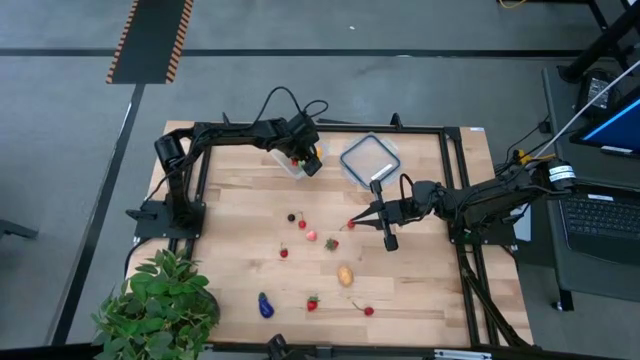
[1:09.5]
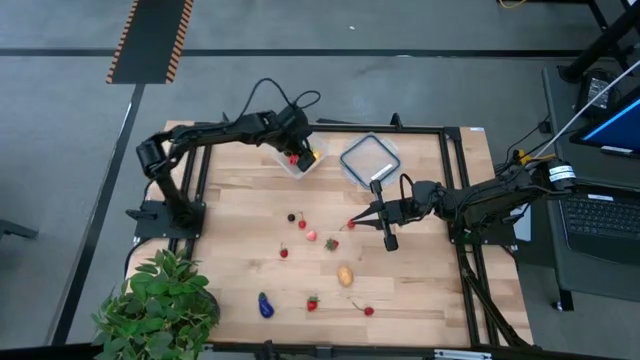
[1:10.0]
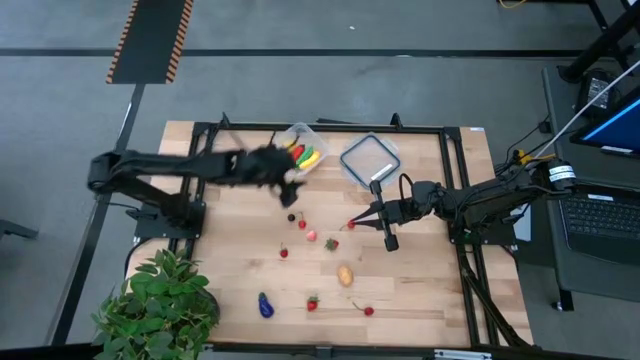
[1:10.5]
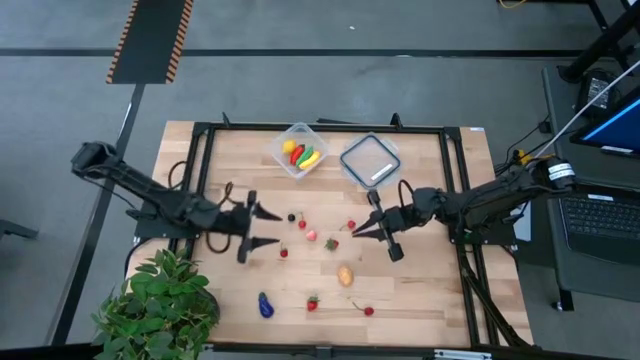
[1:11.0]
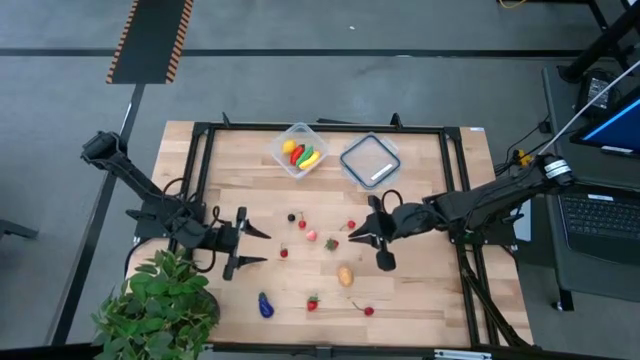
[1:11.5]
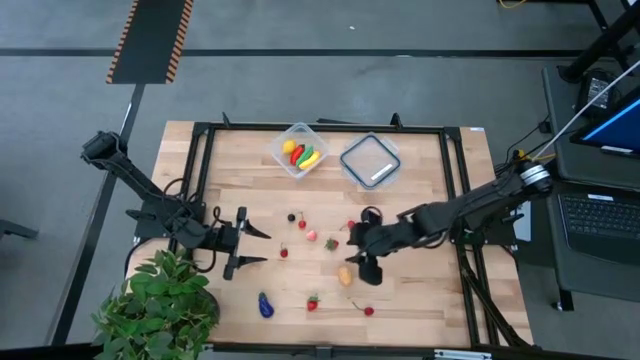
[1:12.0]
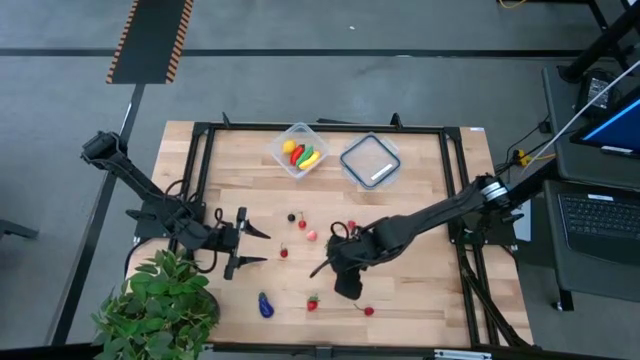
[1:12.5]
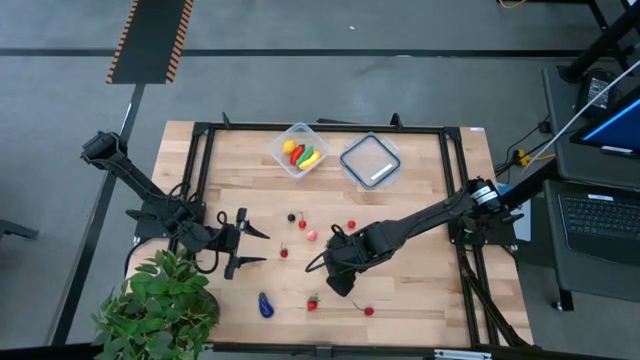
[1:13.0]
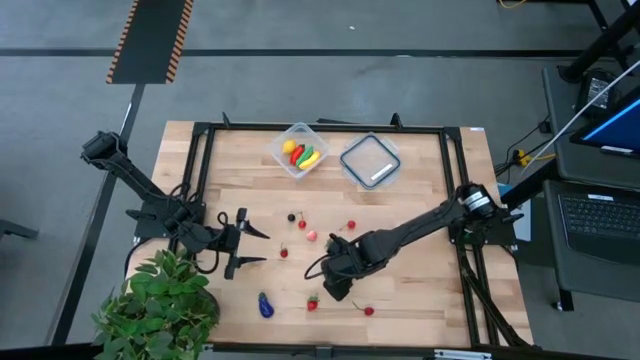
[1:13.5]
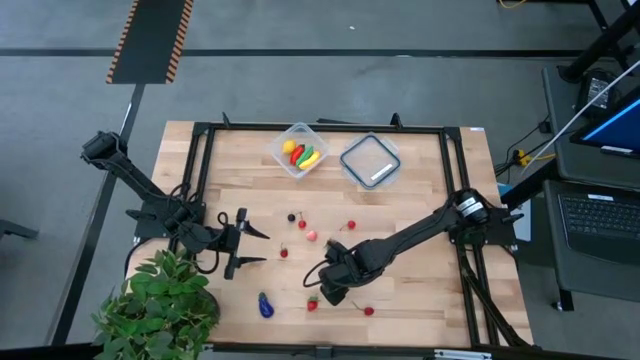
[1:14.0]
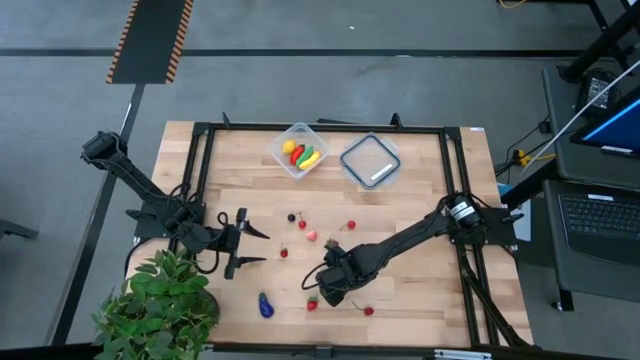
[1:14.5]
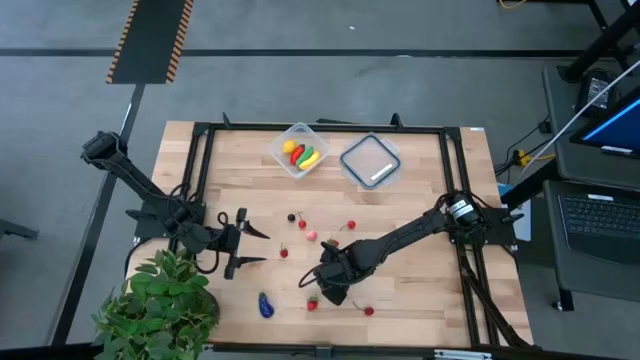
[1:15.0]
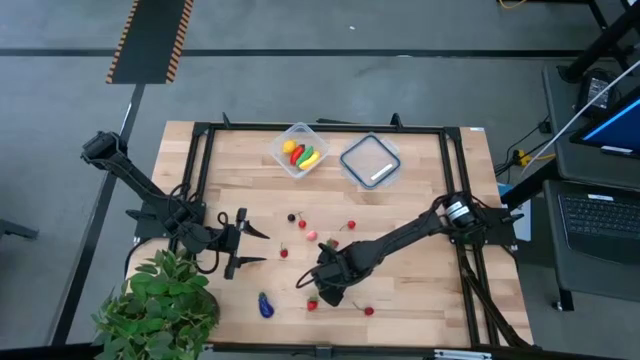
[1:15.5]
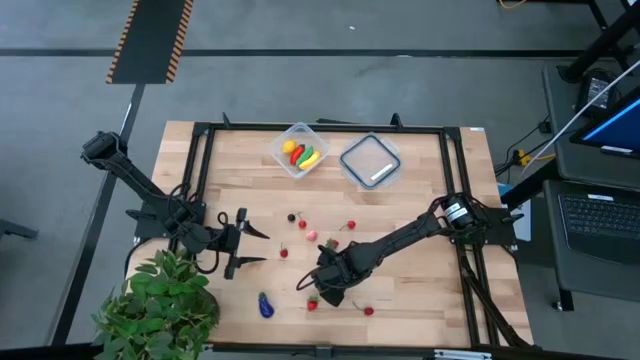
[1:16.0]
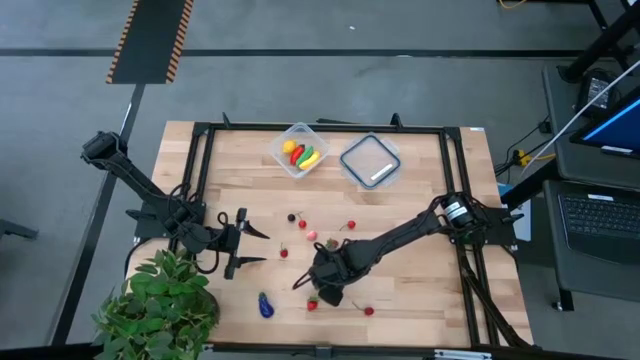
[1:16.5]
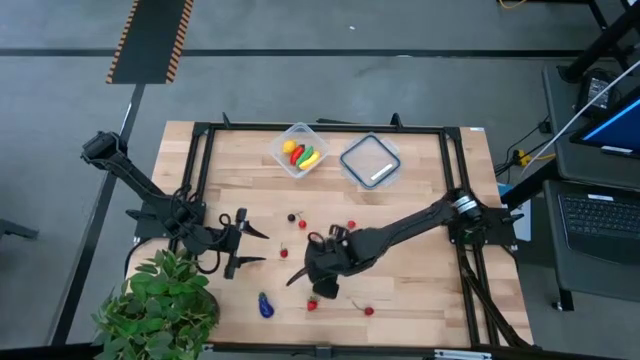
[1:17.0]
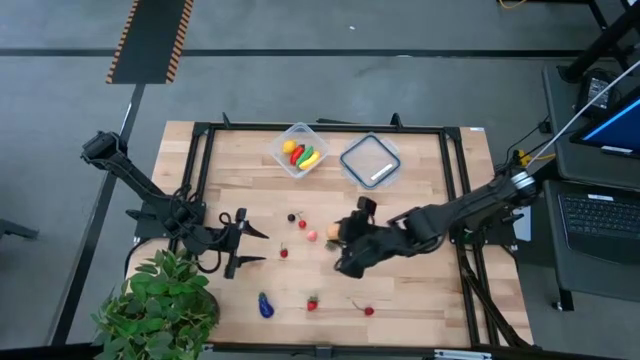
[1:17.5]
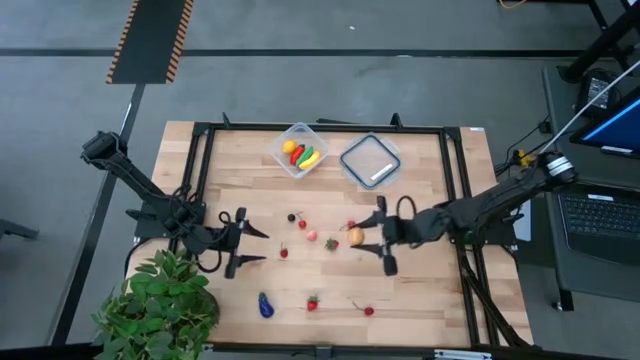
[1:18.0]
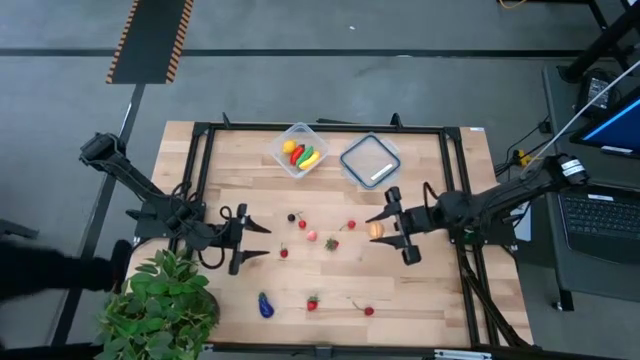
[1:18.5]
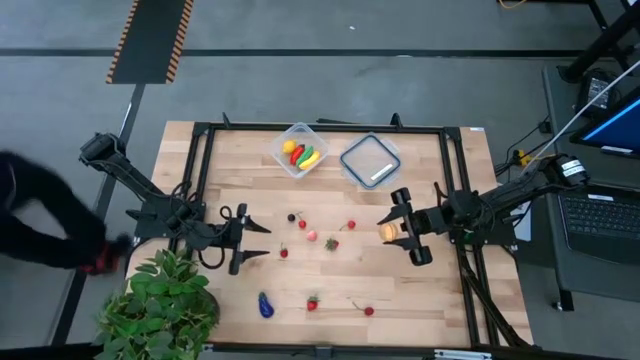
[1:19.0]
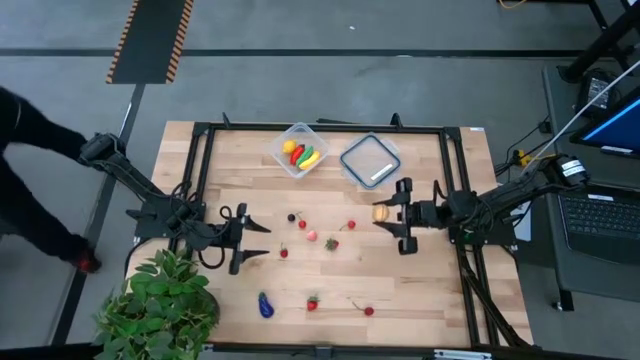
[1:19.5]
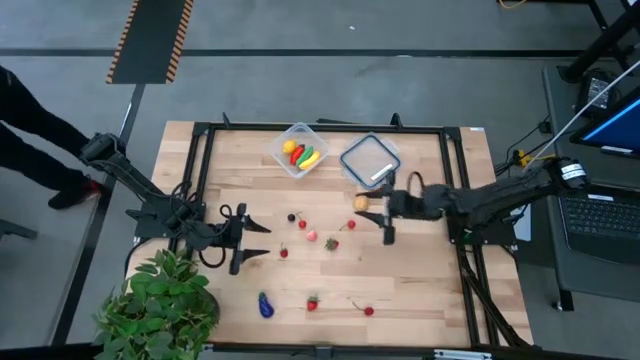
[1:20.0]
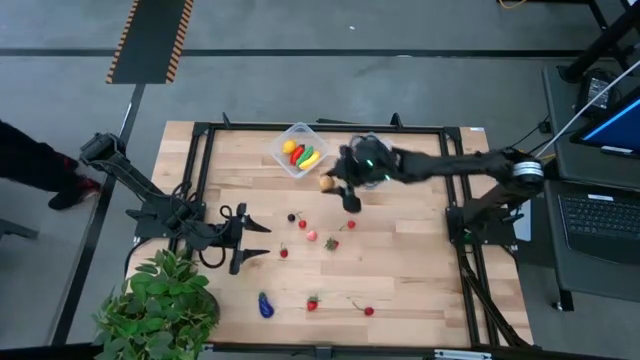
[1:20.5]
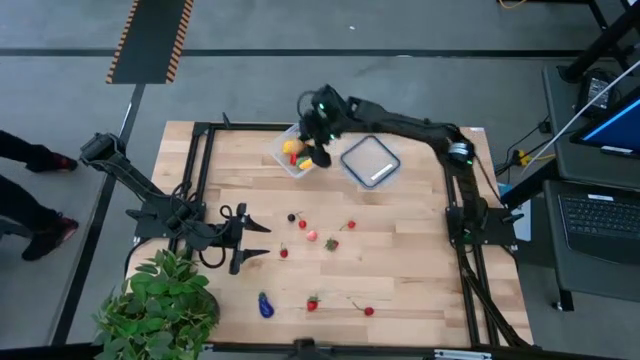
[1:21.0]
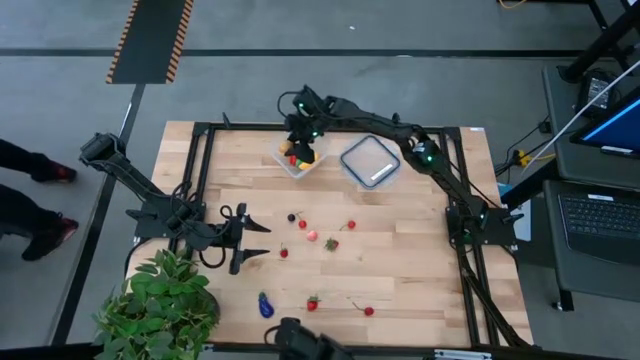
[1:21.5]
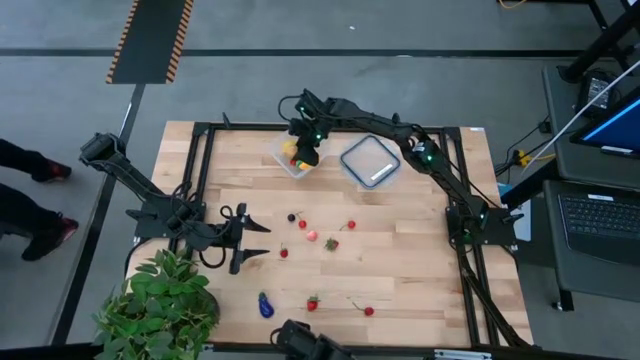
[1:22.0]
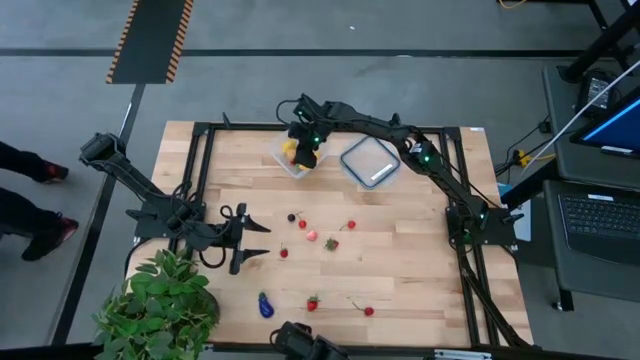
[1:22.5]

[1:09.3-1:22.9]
Task: Pick and placing Produce into tupperware
Put the potato into the transparent container
